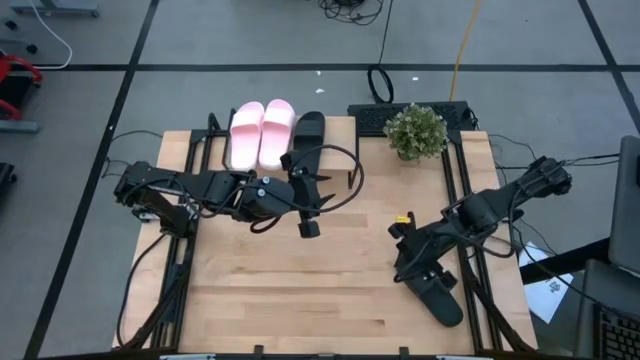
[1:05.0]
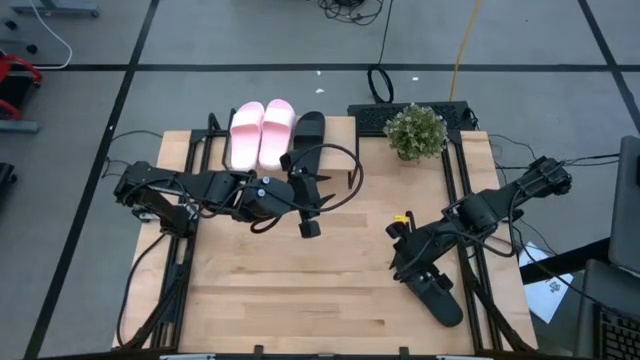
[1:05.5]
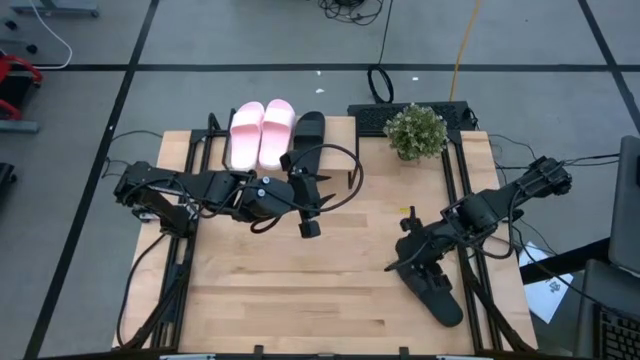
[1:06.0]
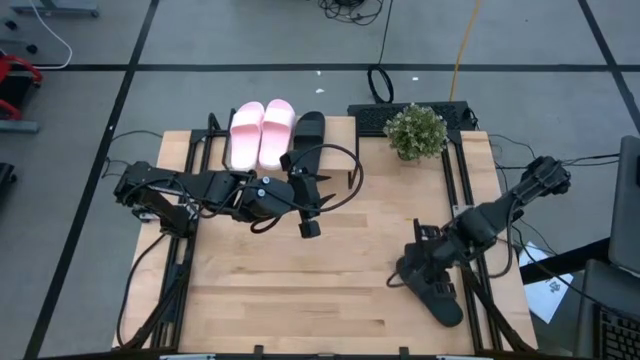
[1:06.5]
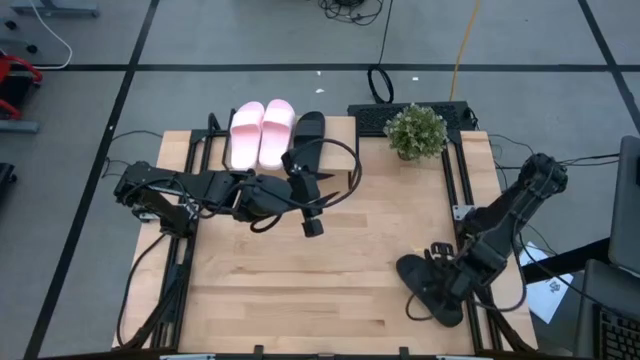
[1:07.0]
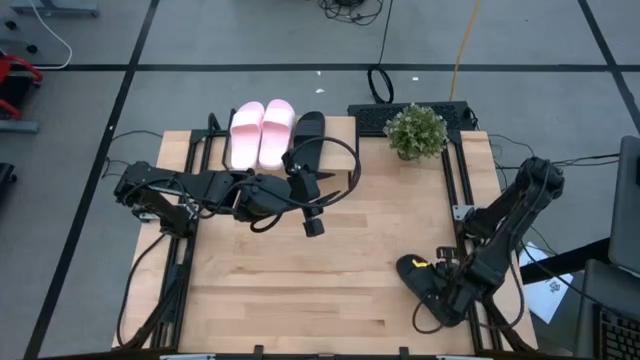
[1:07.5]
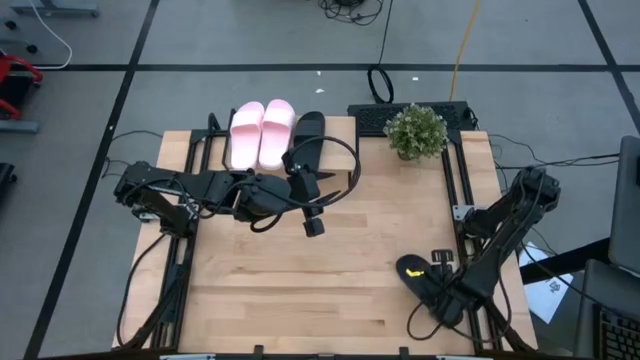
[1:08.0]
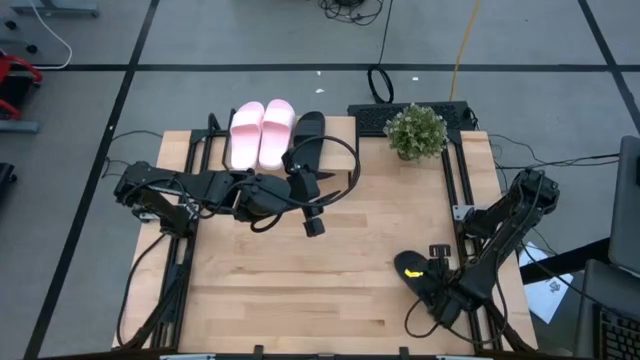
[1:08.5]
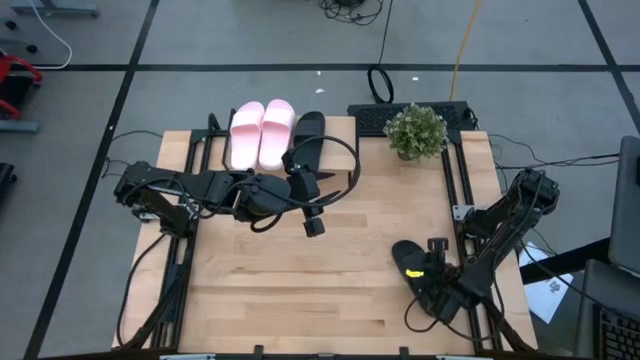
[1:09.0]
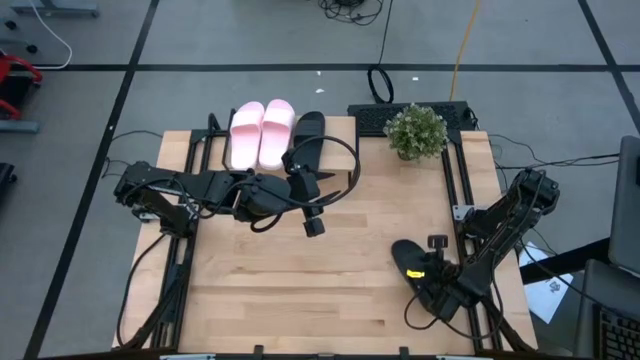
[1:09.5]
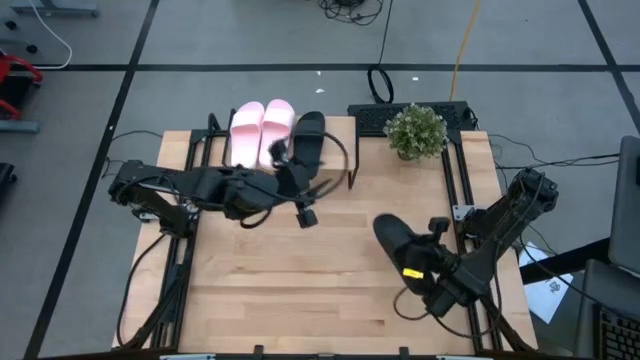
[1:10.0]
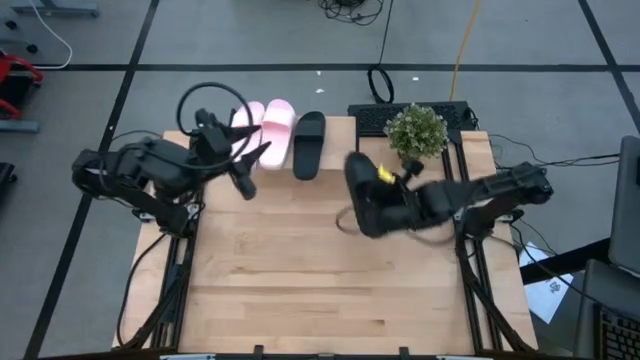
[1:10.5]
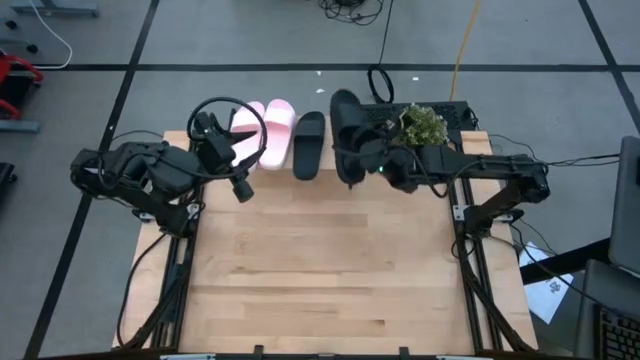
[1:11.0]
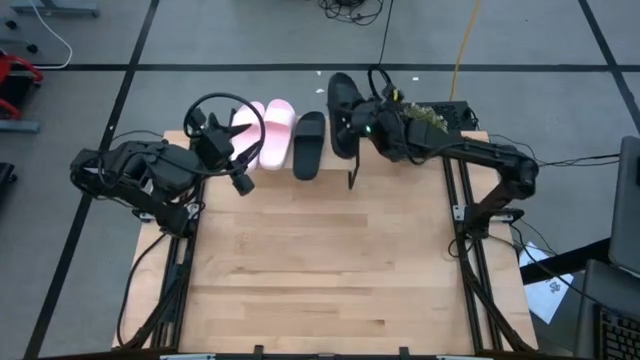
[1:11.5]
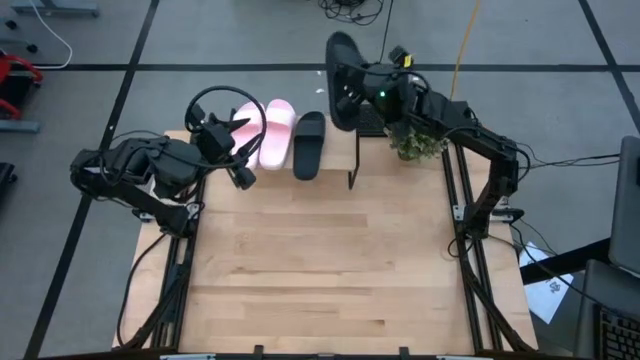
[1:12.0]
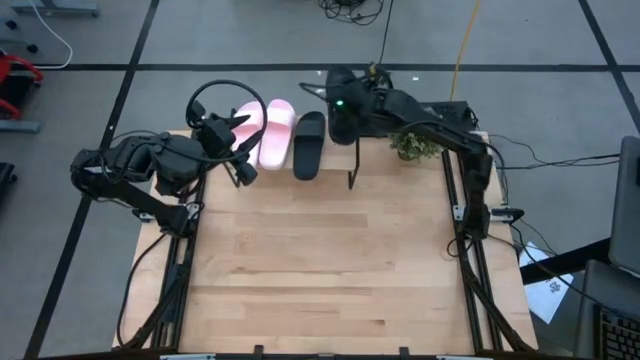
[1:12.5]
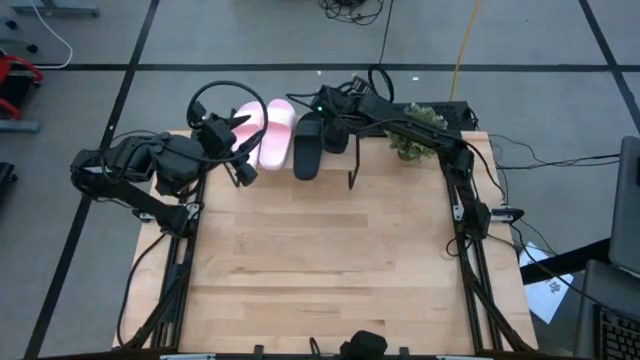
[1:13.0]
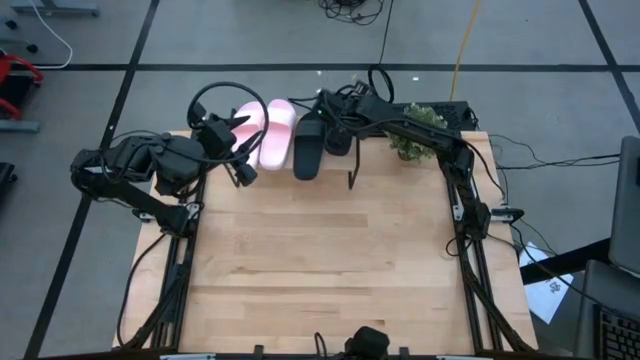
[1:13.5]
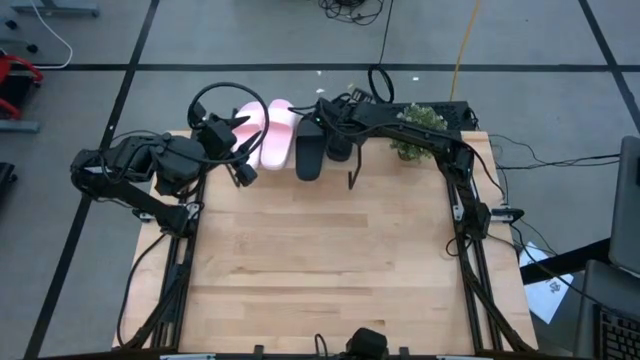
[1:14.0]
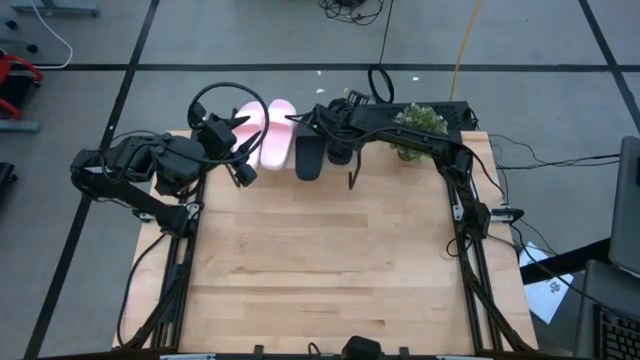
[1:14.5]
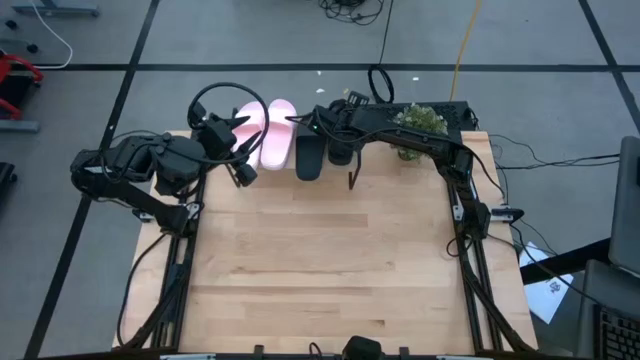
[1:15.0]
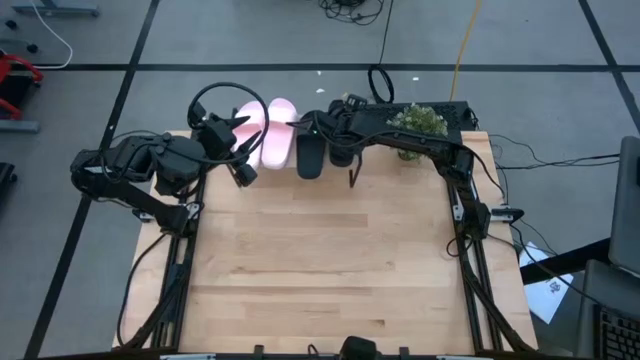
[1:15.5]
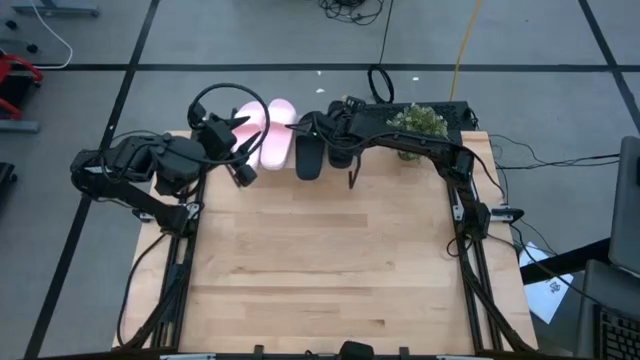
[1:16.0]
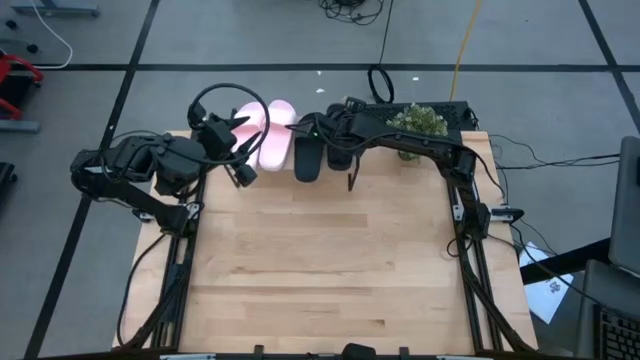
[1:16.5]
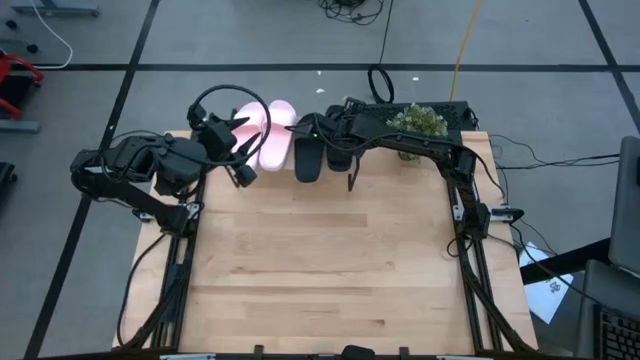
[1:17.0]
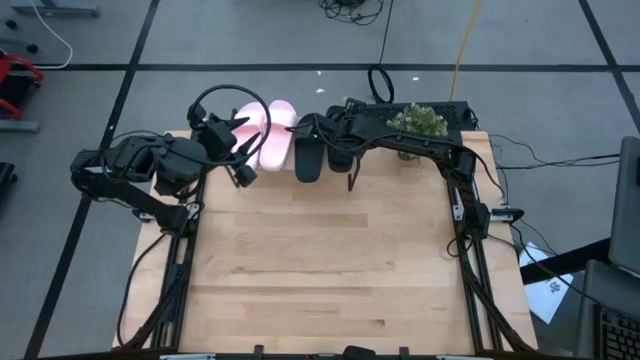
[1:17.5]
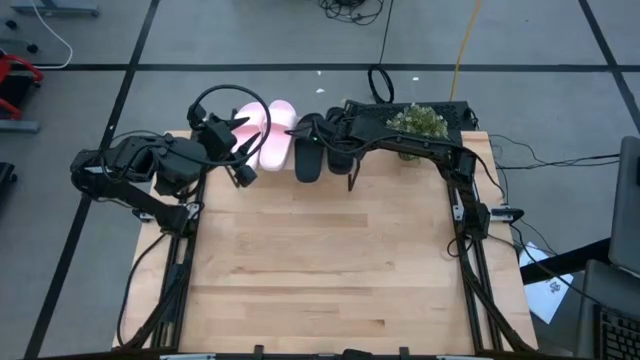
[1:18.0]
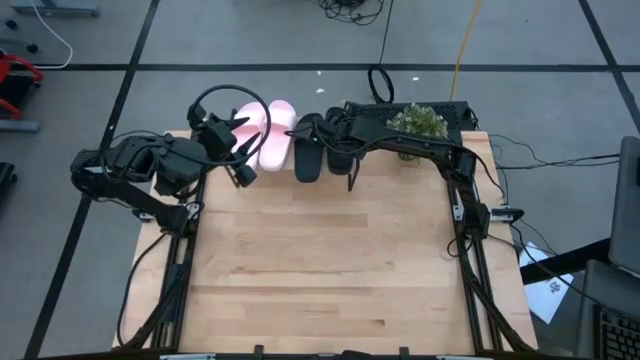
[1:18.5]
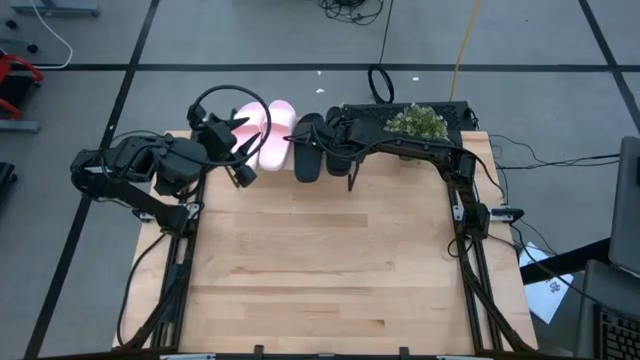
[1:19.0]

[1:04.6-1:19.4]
Task: Pick and place slides into the shelf
Put the black slides on the shelf

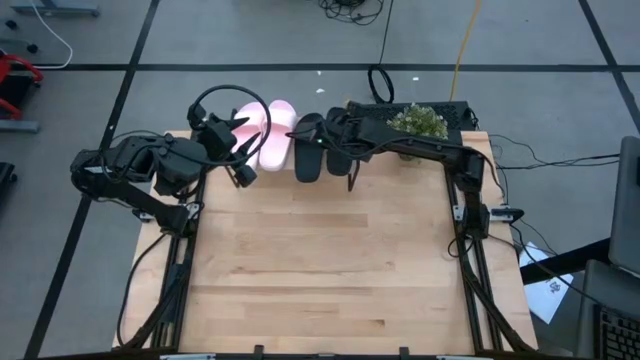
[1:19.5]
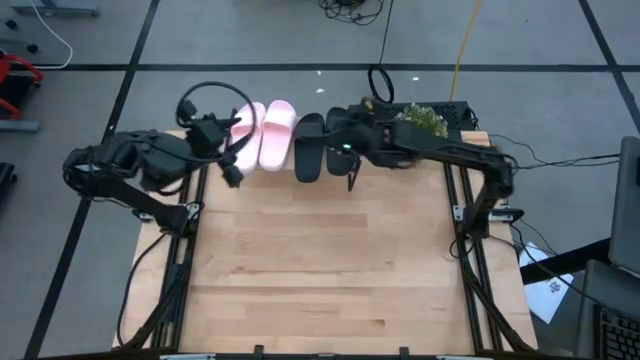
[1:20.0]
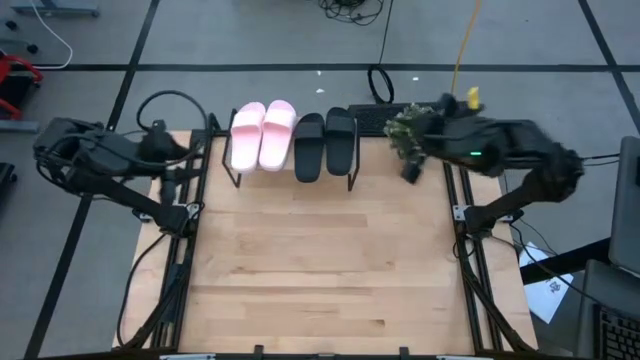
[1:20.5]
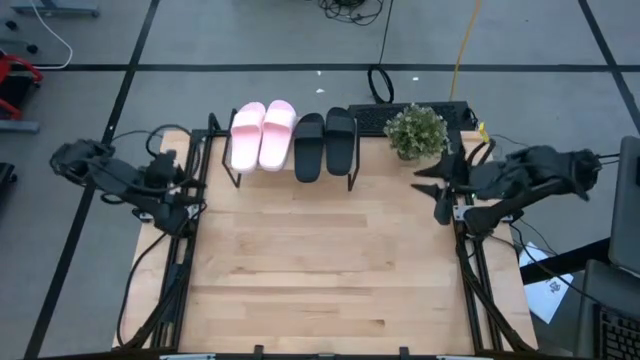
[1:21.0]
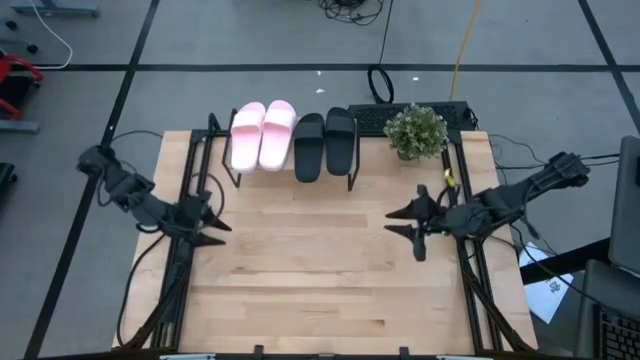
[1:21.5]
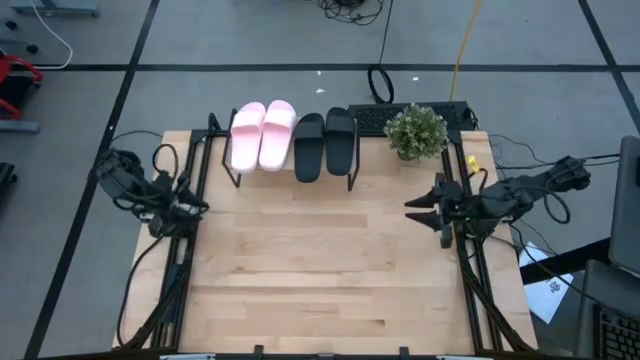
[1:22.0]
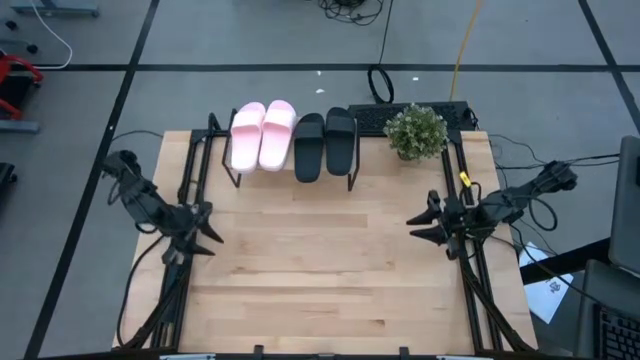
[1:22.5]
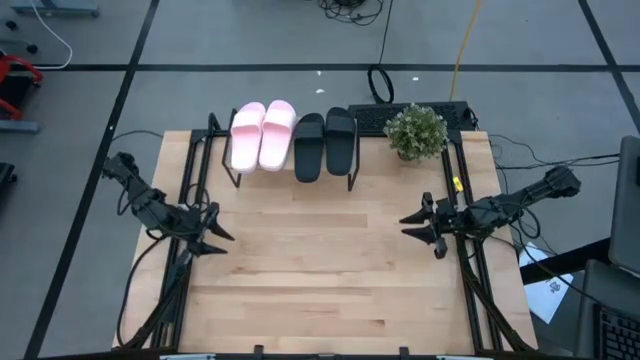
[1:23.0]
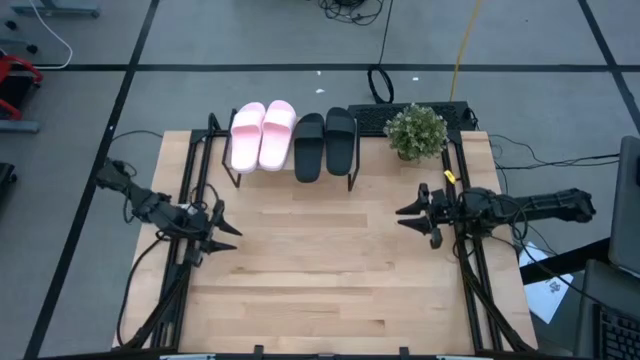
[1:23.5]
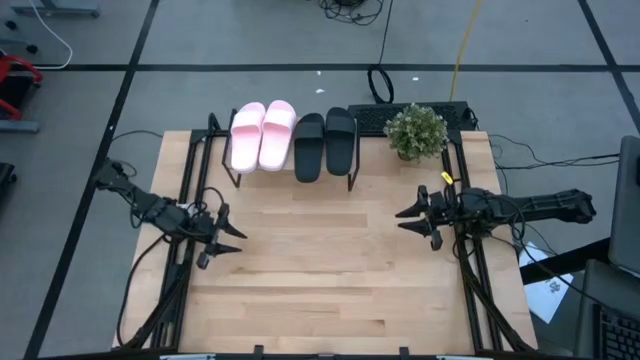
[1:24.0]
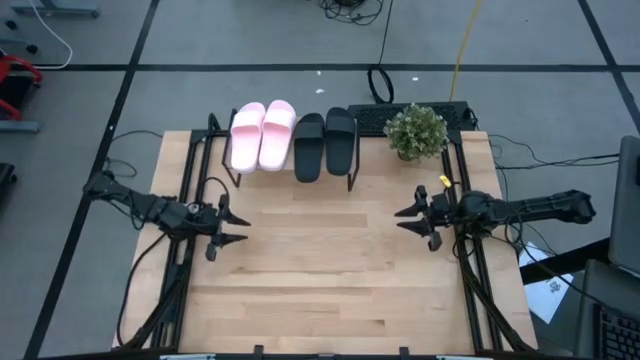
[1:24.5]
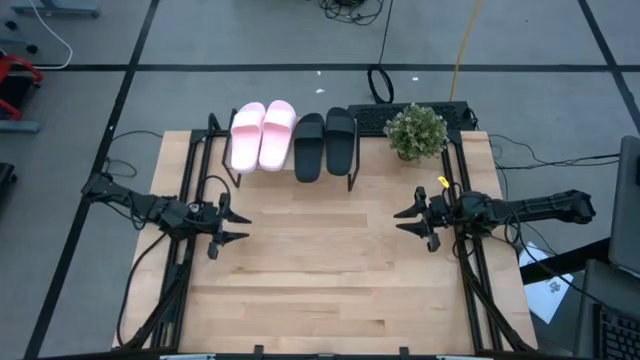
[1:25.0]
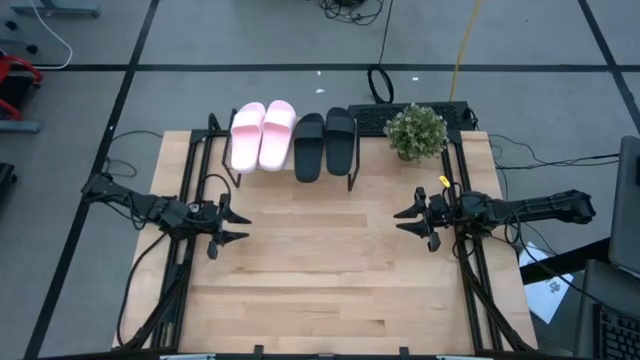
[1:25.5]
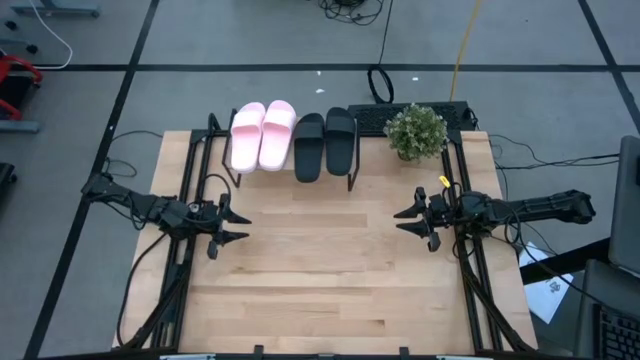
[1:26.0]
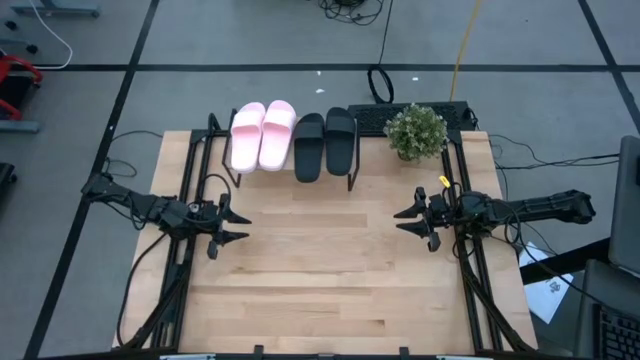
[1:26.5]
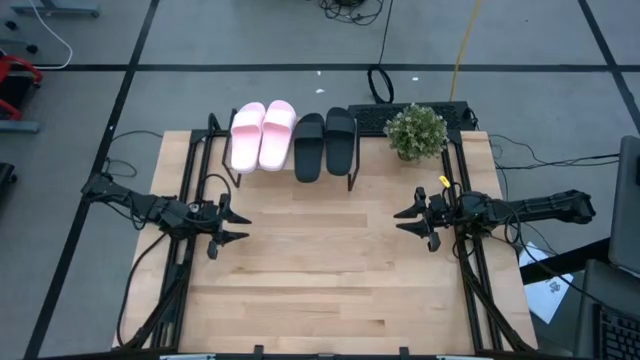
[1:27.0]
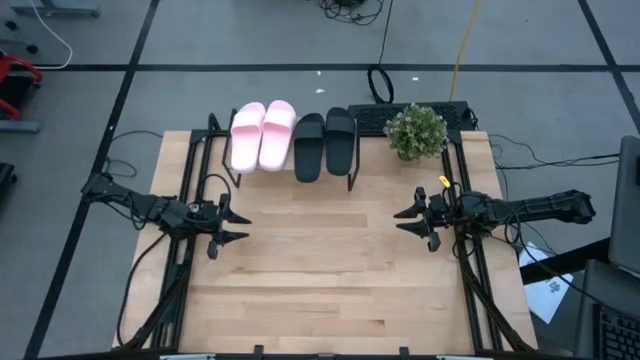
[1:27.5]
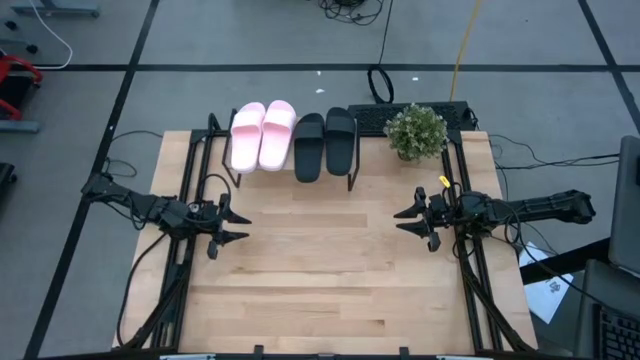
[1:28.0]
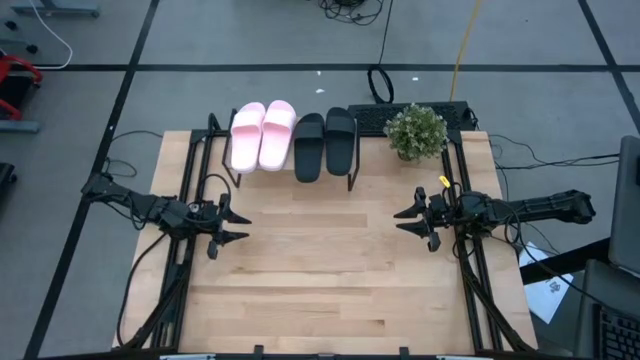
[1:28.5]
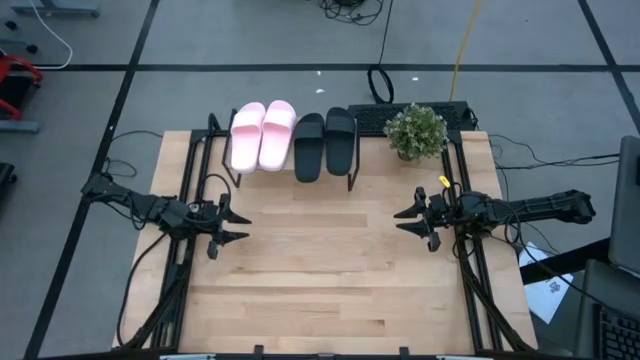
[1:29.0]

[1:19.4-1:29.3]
Return to Home Position
